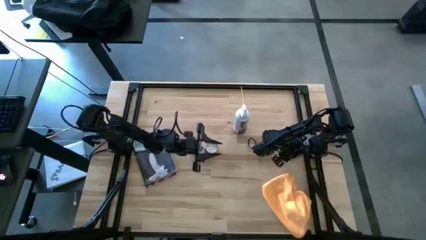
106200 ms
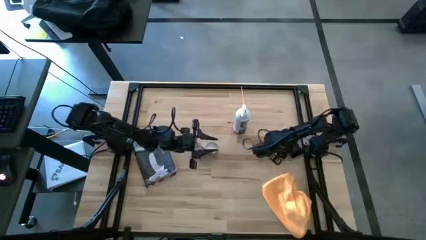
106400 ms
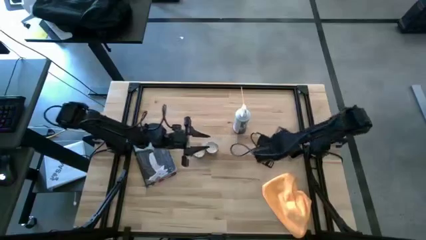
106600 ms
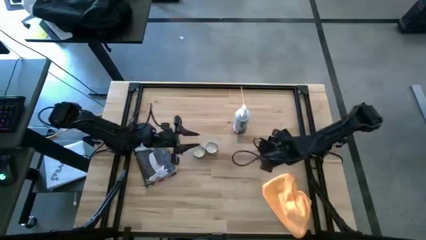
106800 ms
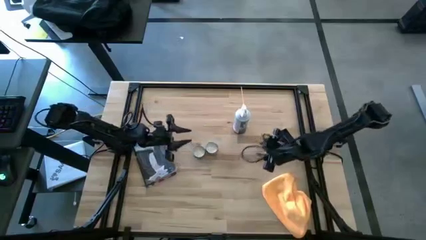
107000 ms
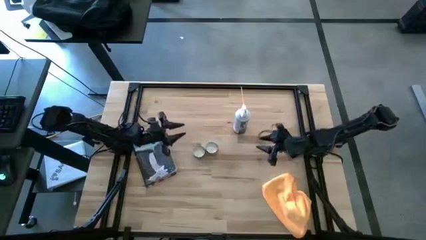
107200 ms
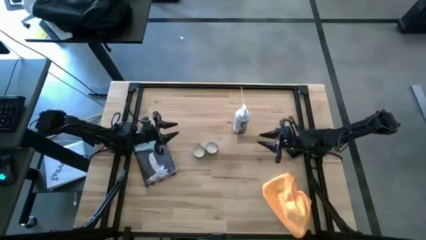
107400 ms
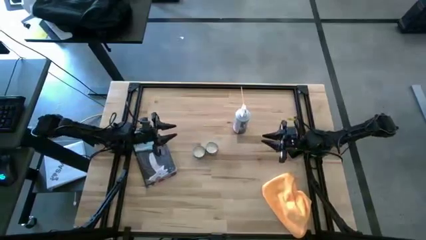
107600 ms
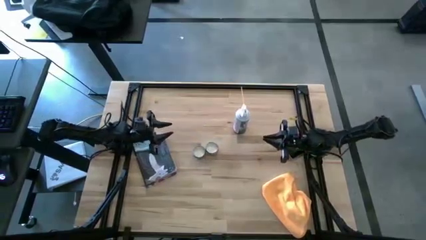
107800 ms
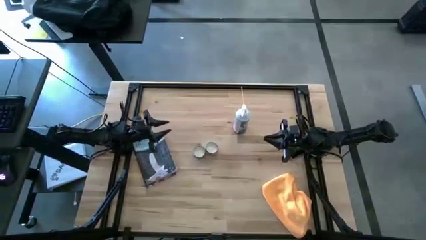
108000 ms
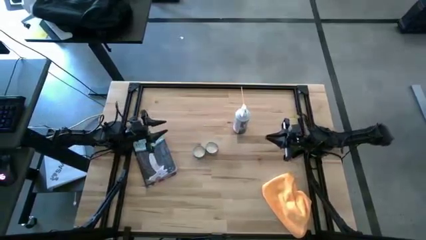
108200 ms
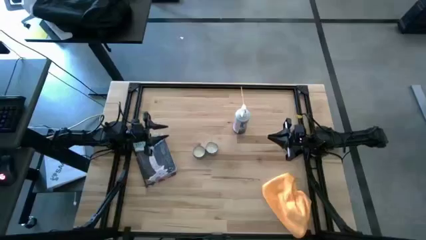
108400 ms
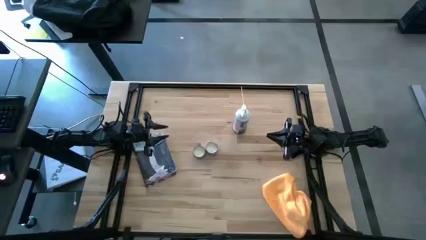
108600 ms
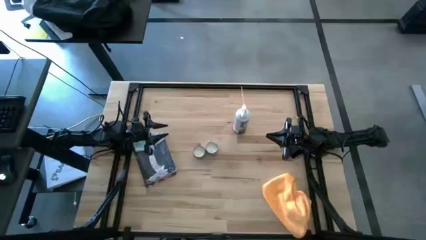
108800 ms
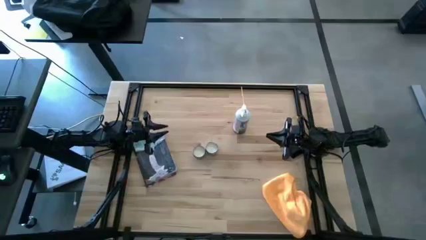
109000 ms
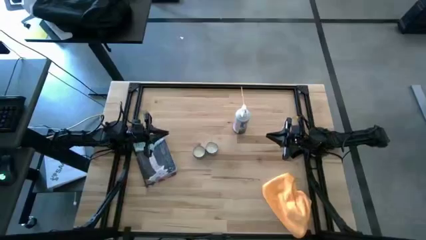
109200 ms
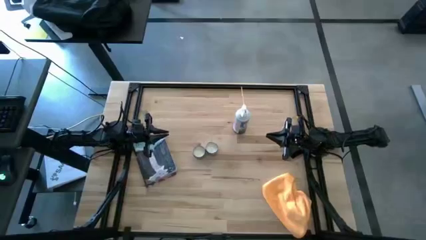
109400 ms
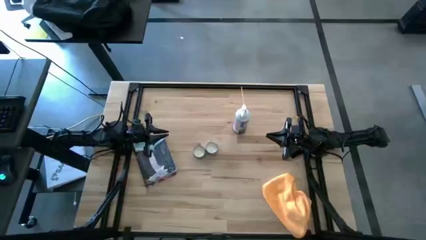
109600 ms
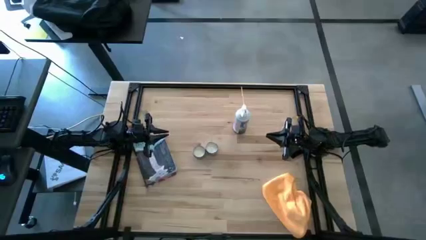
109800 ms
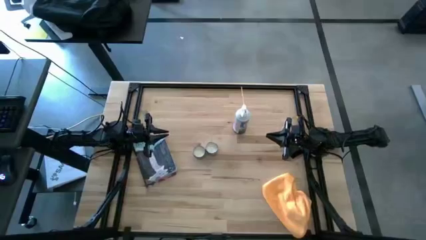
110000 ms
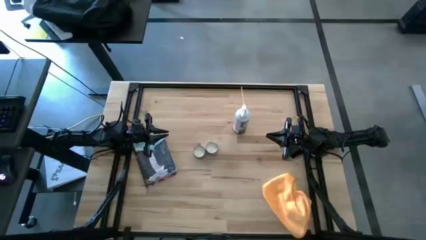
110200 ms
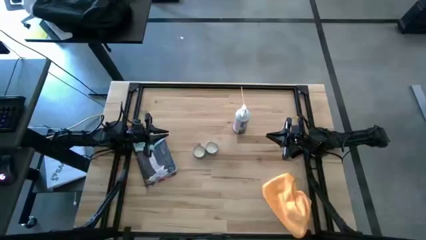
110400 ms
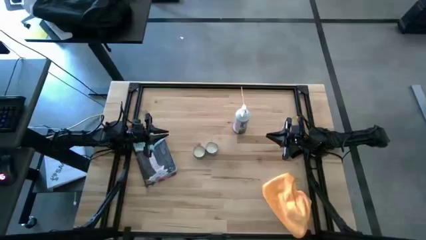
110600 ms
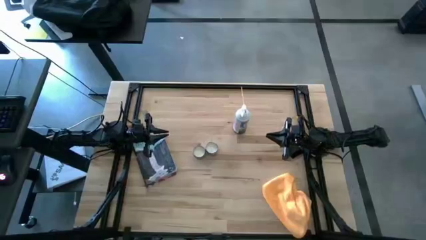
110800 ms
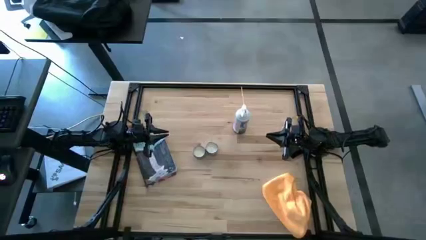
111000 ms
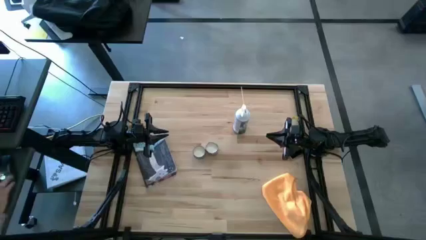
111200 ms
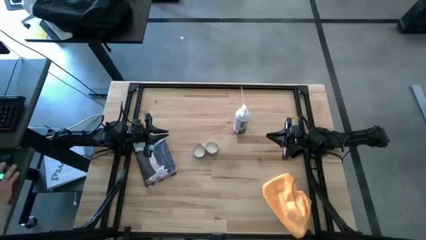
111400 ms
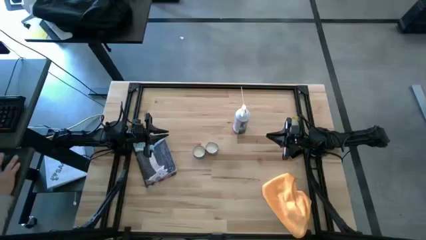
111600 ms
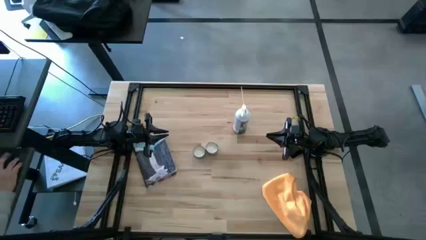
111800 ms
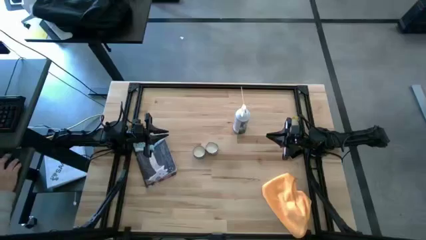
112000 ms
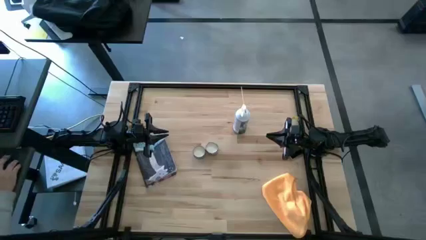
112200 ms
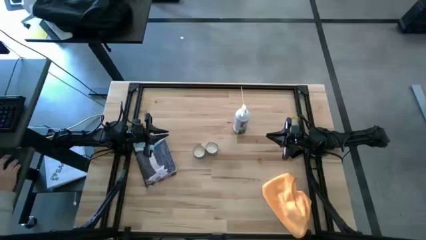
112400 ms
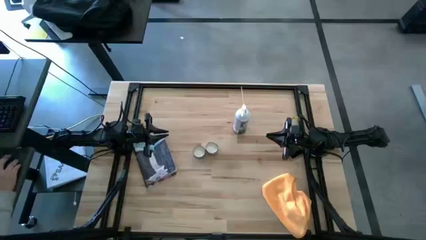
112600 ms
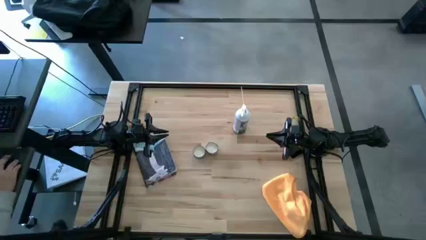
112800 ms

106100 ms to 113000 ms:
Task: Apply microfiber cloth
Return to home position

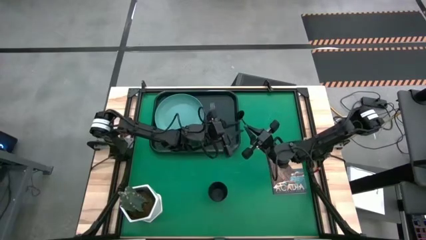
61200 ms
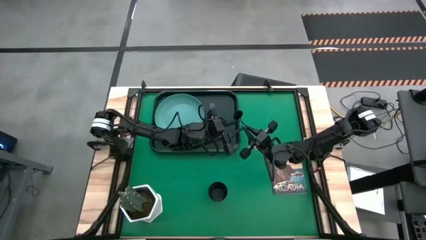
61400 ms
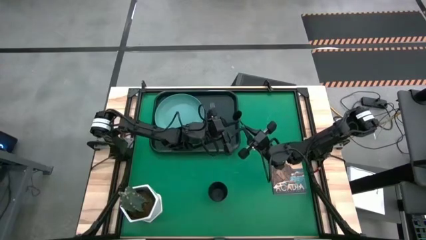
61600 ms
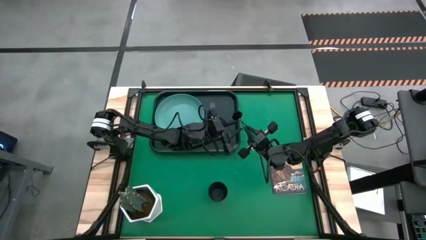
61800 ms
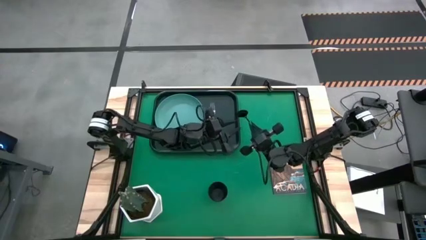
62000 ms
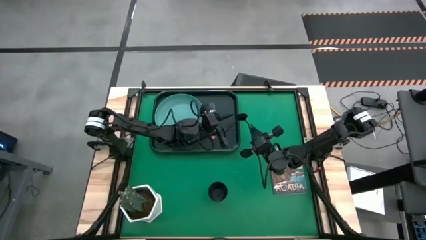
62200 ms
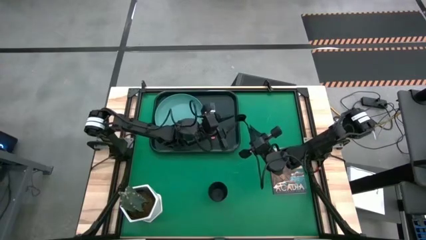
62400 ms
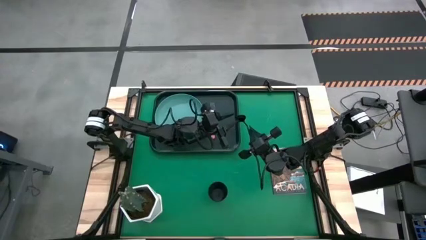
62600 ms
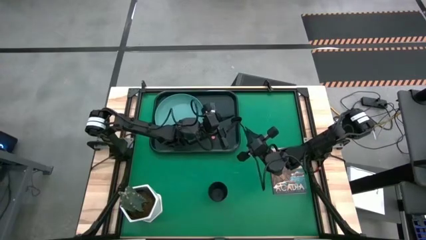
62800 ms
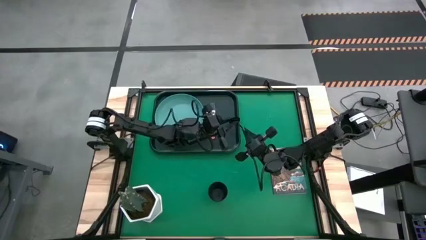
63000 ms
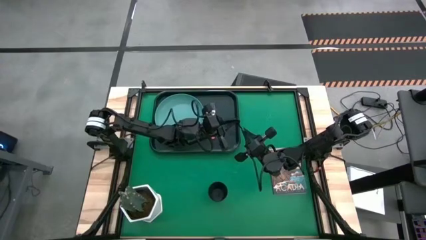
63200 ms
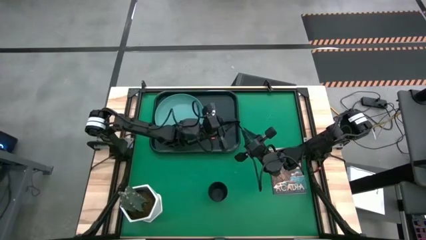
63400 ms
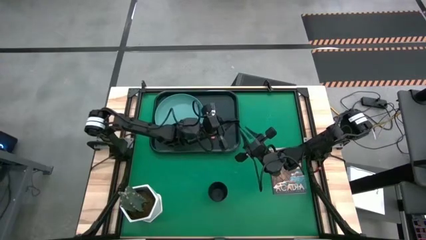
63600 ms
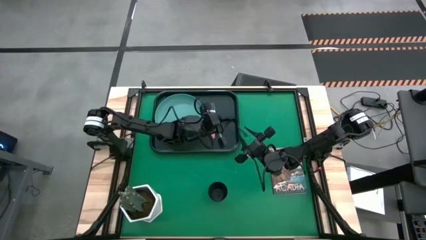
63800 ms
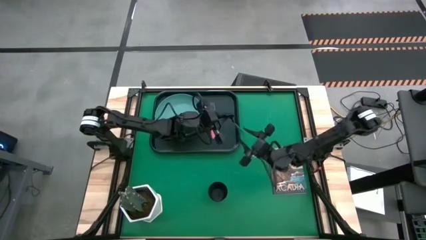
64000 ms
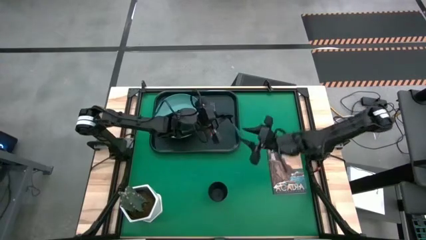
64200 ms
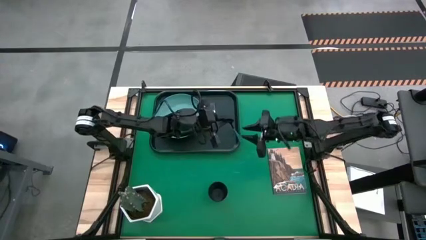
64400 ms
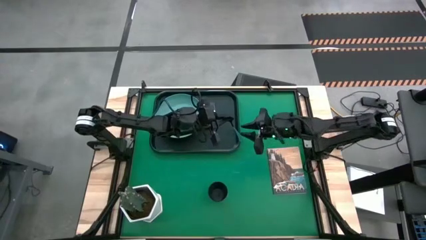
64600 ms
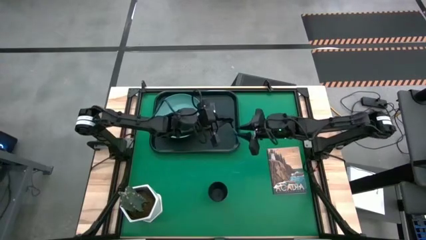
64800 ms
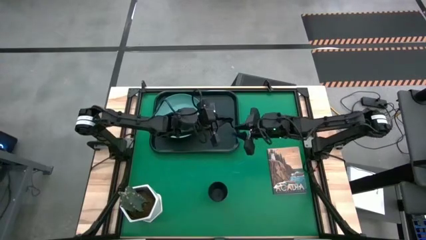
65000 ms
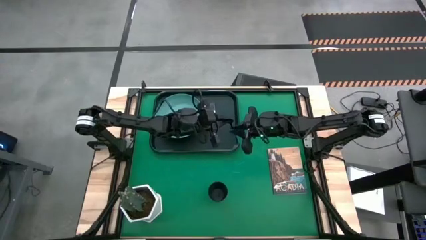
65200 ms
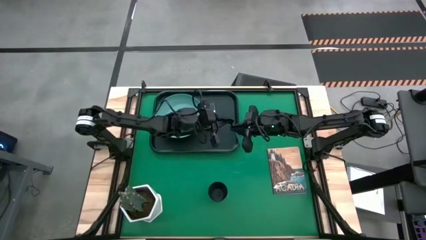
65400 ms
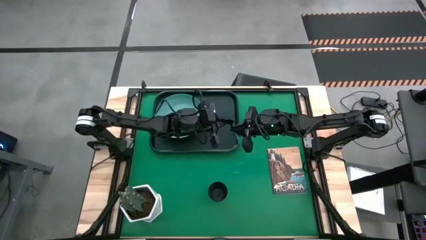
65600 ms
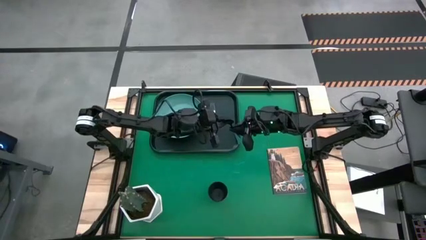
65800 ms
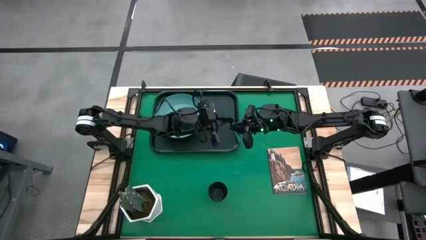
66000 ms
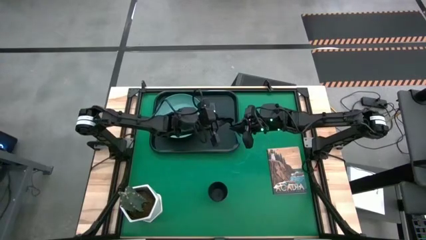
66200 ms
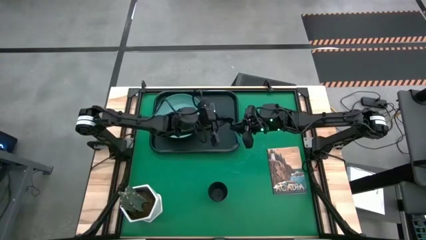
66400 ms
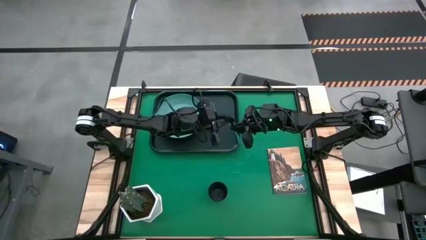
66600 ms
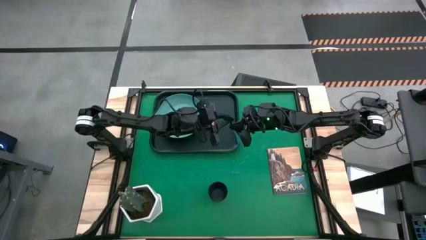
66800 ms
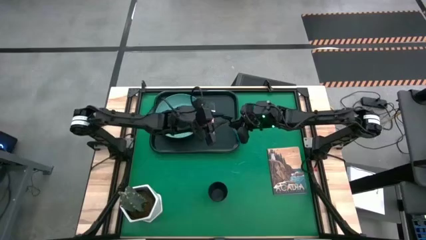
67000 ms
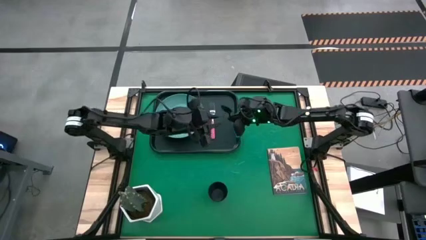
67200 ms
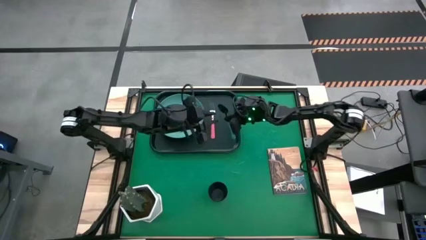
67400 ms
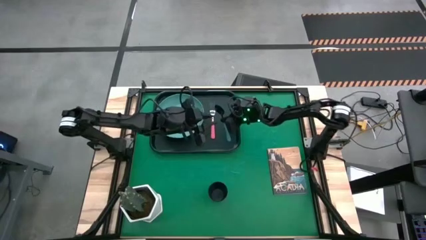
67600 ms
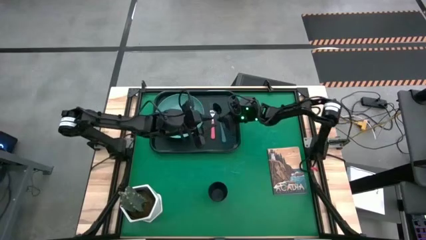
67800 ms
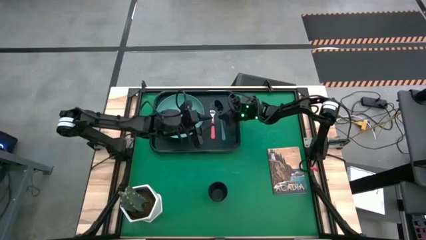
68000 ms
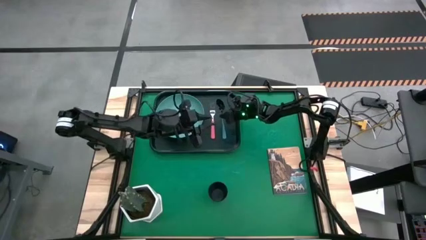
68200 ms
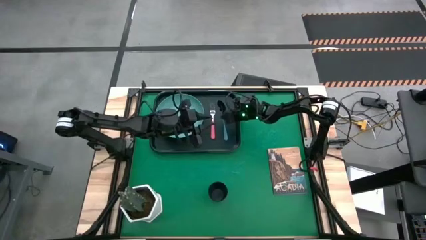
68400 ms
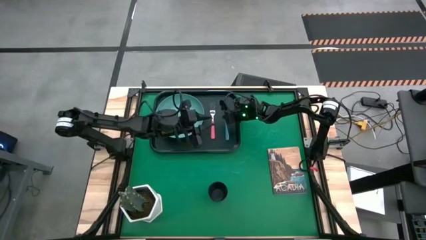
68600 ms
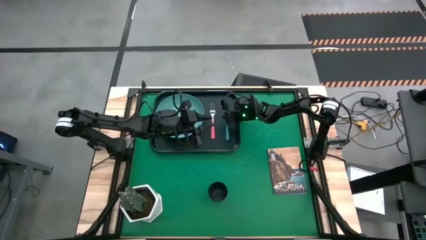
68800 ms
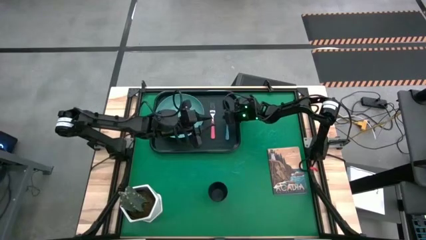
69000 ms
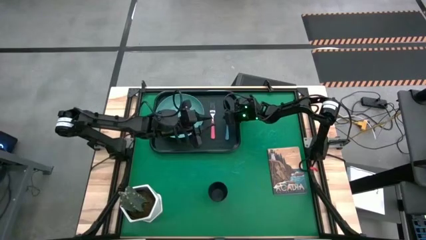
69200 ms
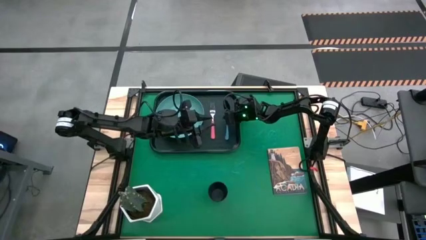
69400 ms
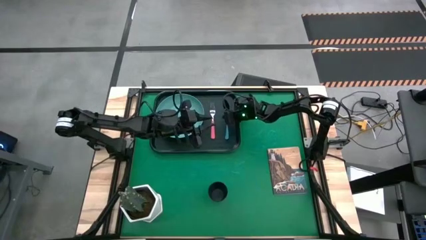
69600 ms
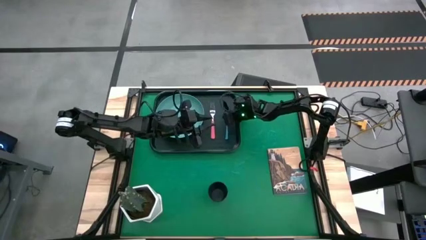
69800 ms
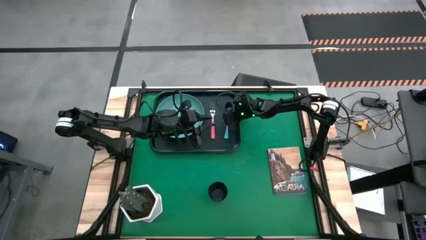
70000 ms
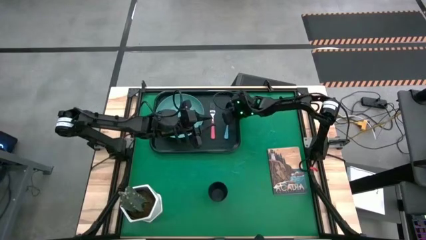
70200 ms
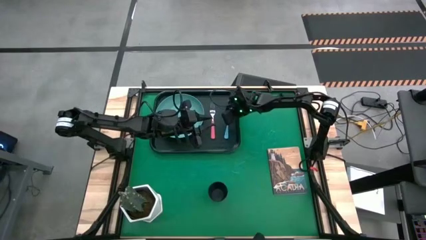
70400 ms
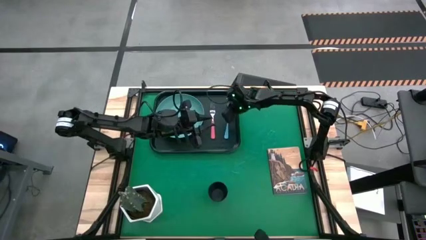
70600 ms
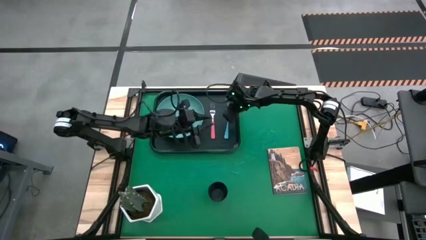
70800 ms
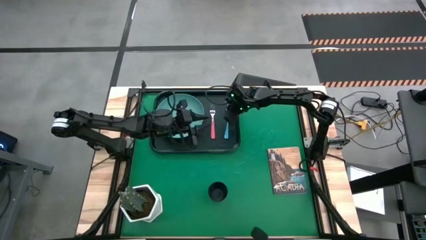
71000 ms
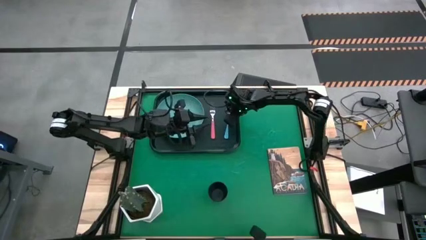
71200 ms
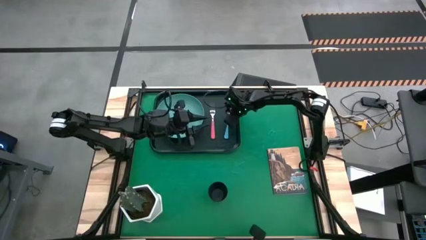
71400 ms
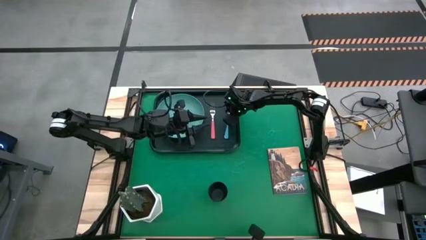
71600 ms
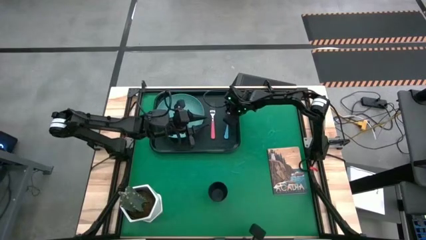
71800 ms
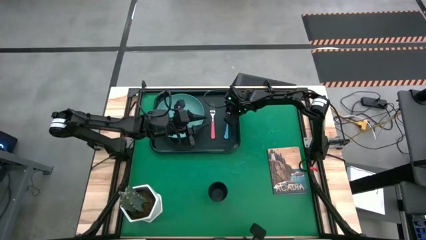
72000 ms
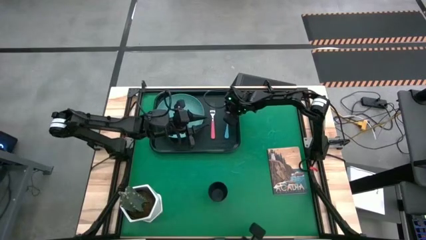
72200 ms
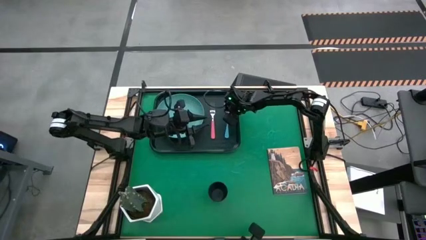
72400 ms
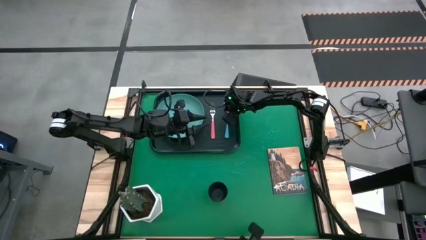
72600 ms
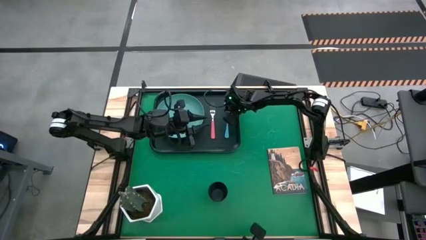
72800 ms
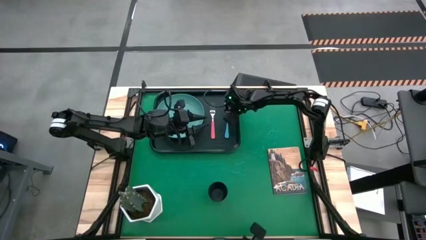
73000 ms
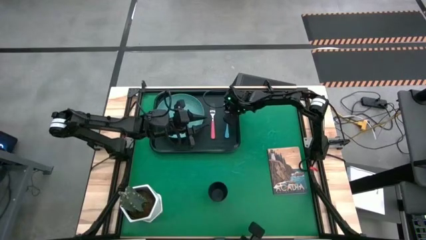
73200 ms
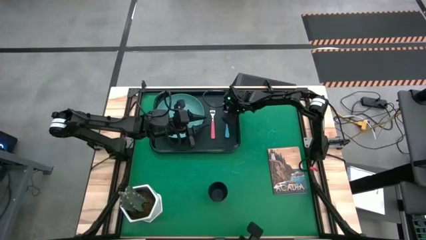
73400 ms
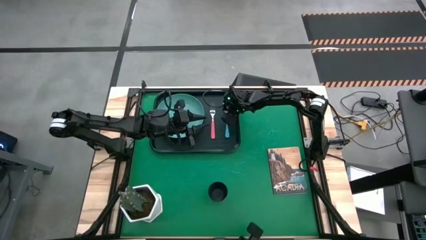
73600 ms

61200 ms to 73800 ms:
Task: Pick and place plate/cup/fork/spoon on tray
Put the blue spoon on the black tray to the right of the pink fork
